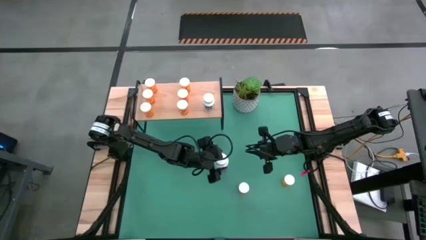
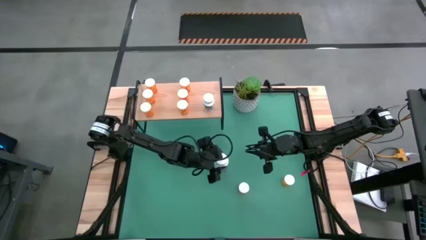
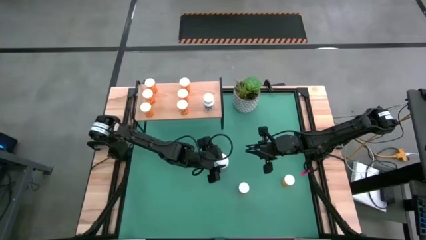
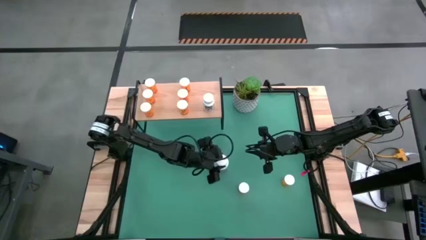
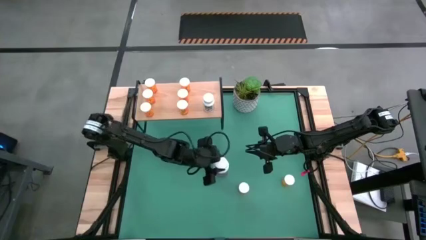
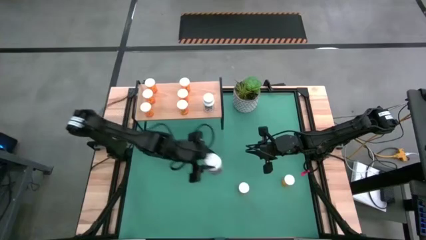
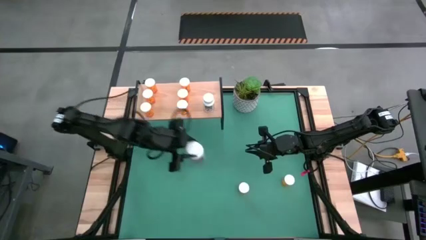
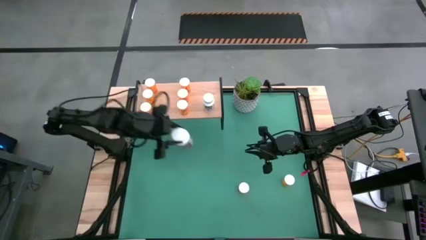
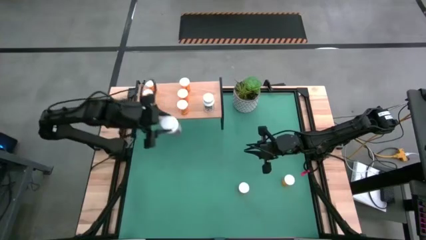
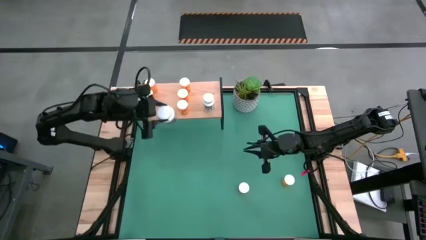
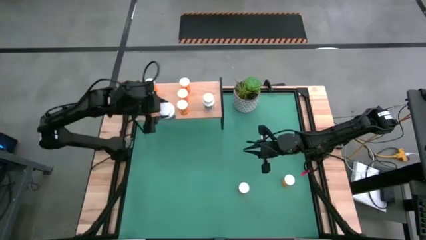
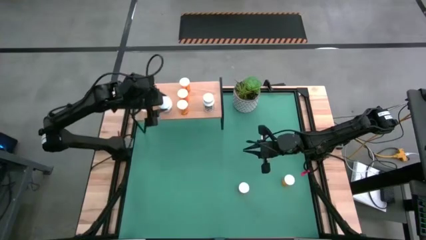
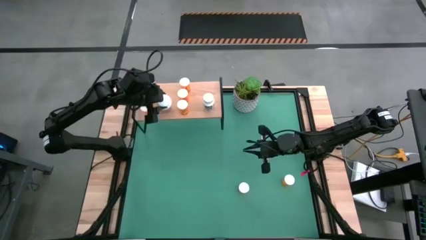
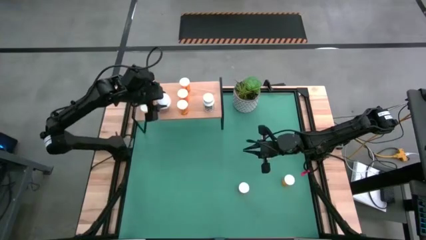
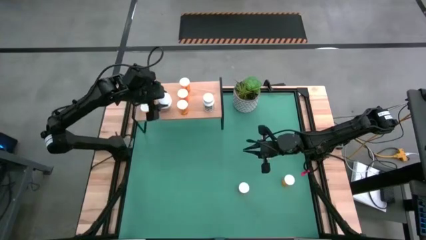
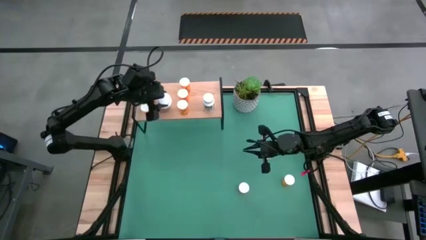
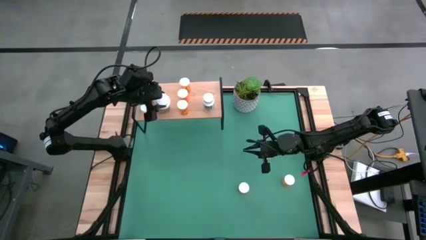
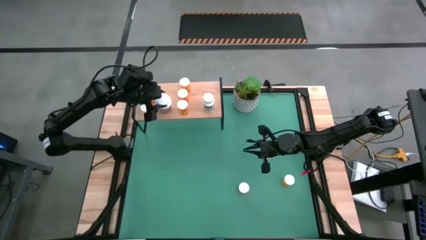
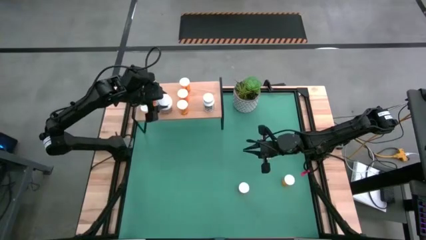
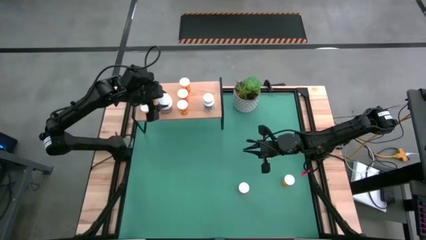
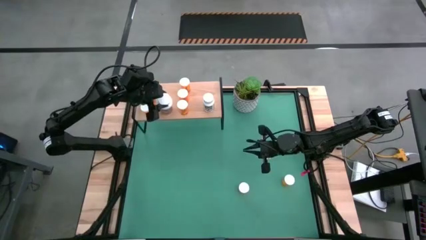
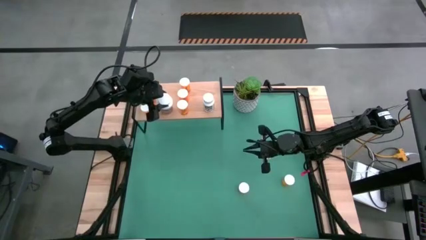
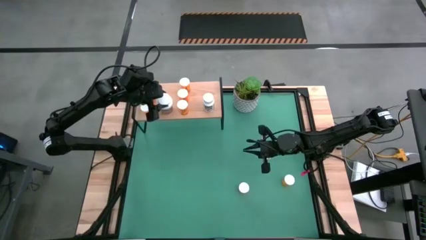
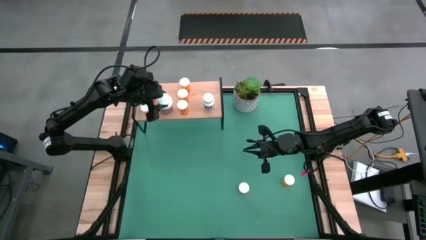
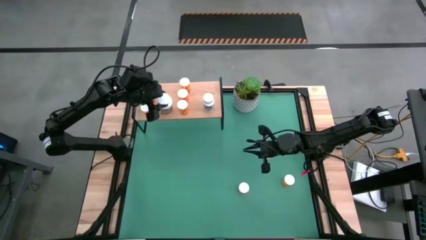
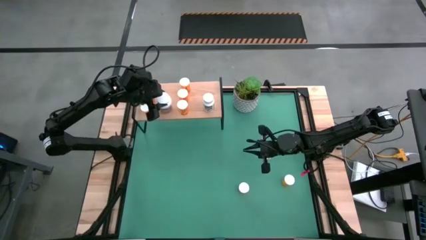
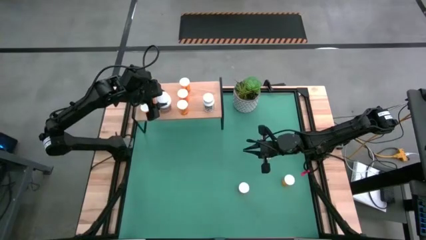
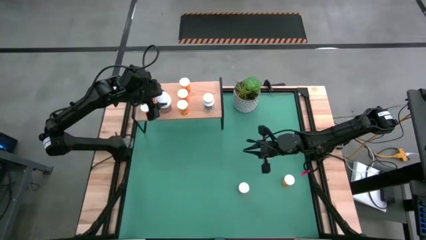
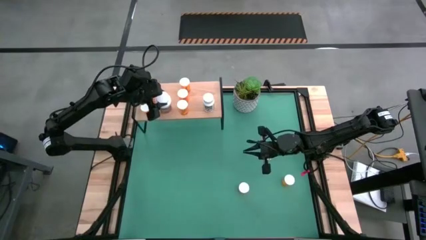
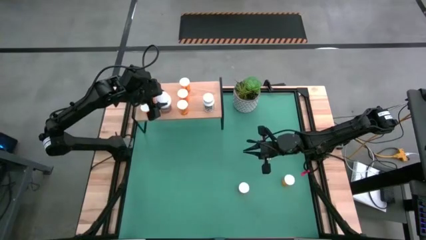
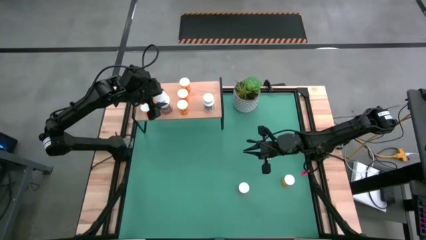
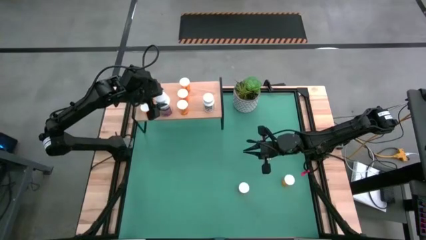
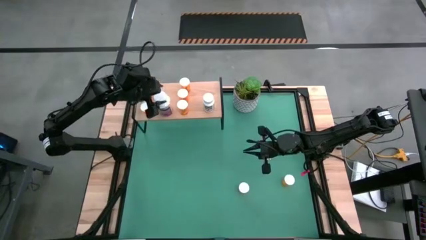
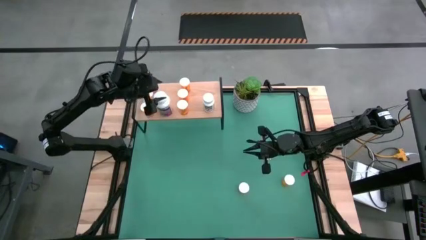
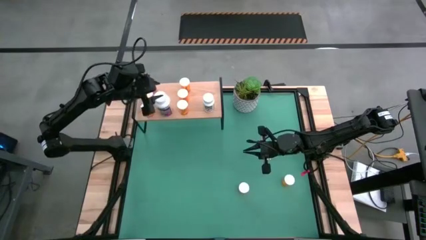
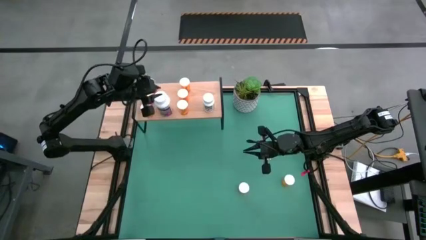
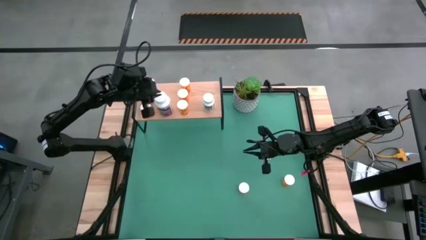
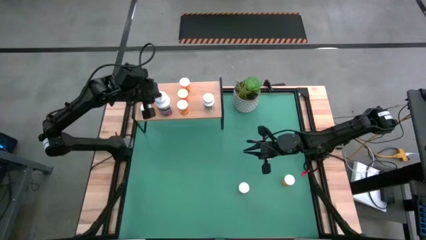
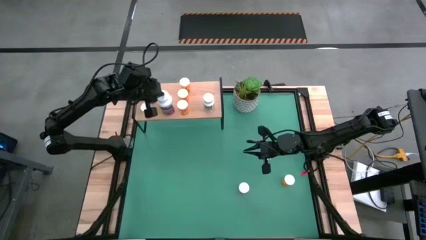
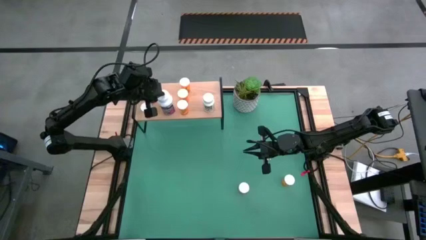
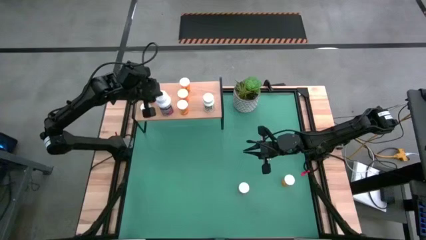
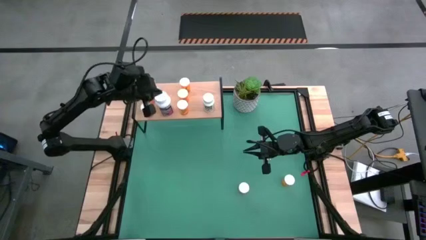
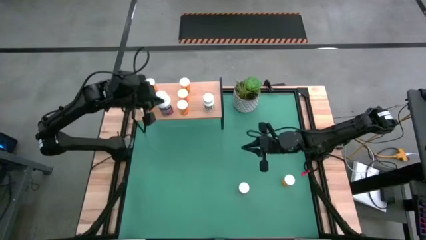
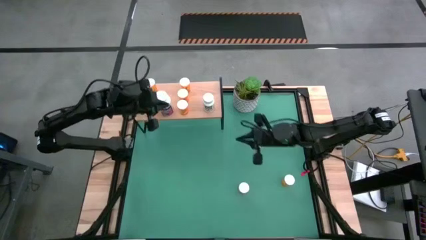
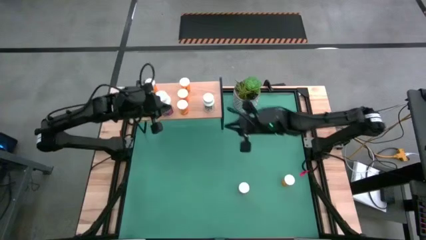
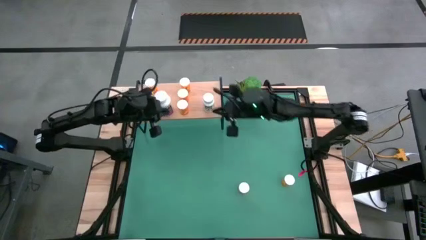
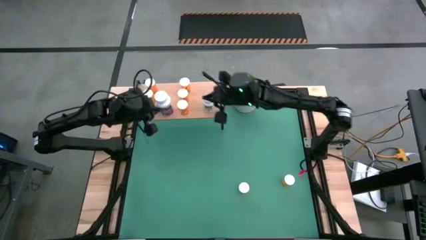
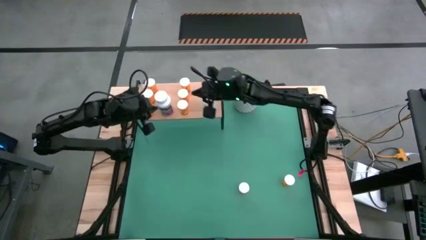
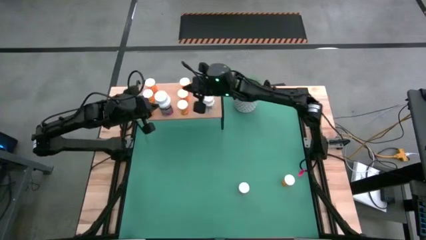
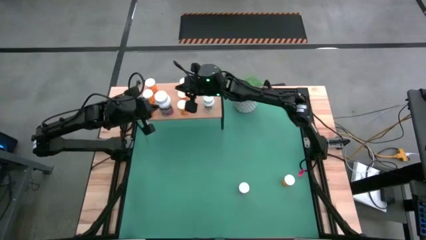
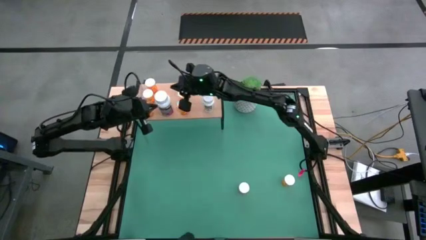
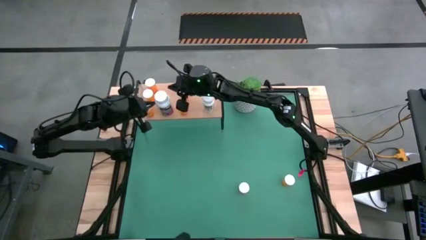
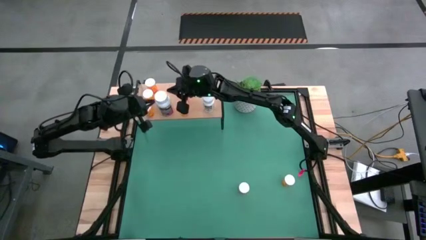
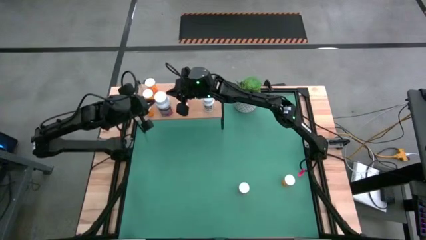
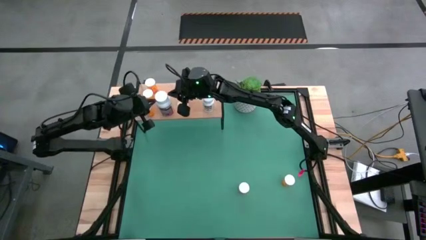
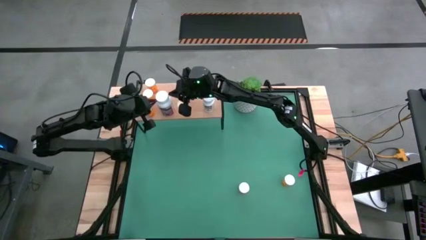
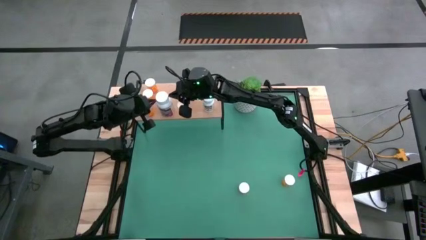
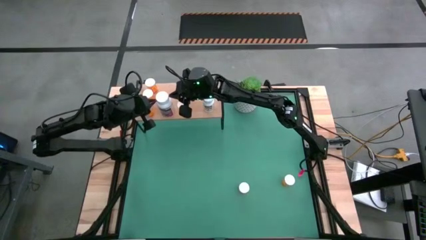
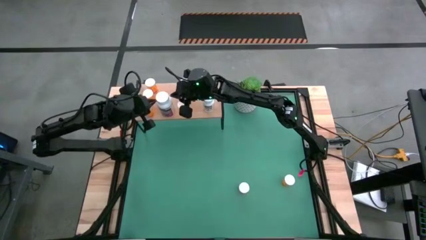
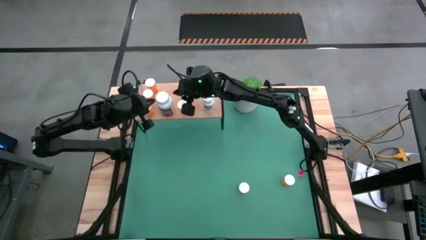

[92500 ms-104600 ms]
Task: Pick and place medicine bottles onto shelf by color
Put the large white pill bottle on the shelf

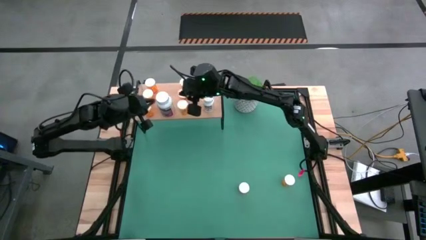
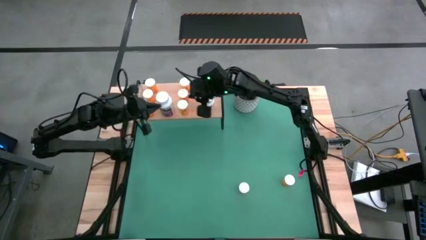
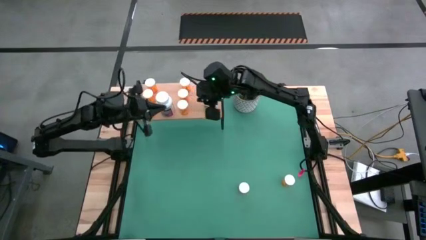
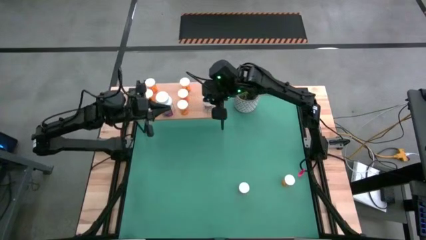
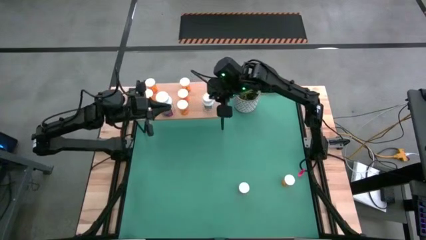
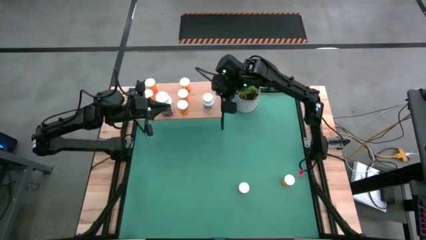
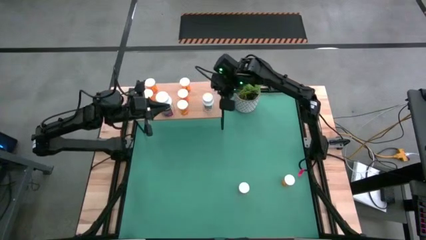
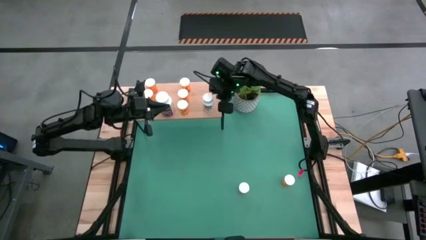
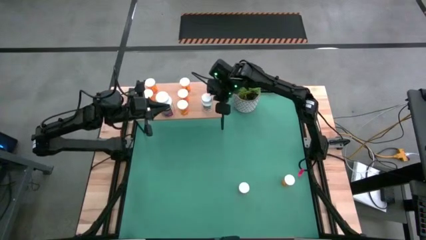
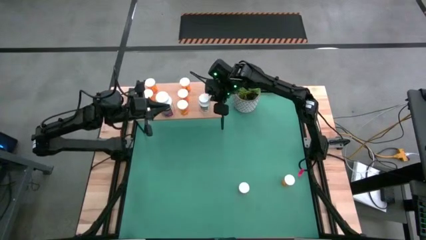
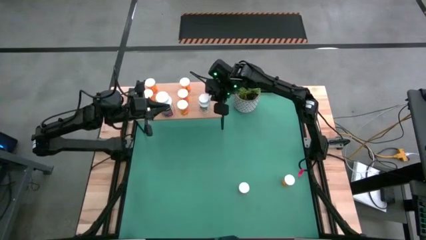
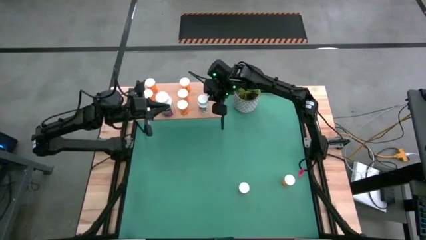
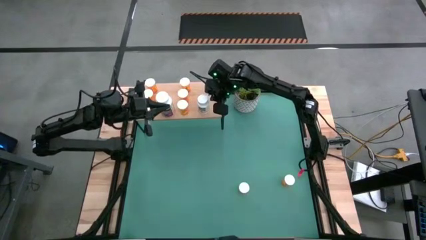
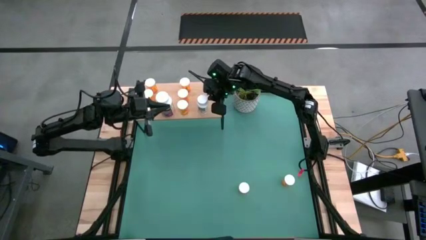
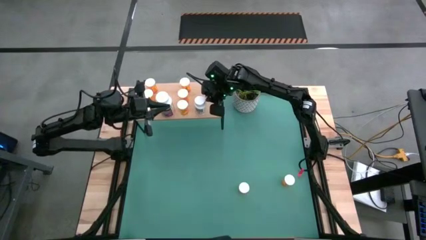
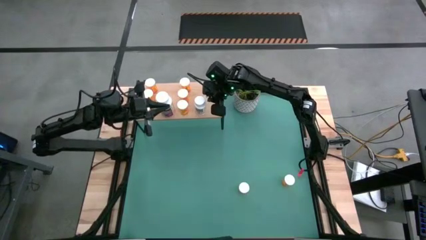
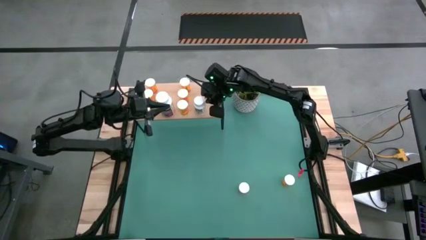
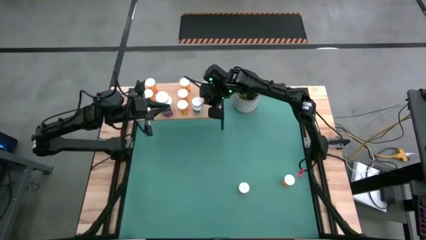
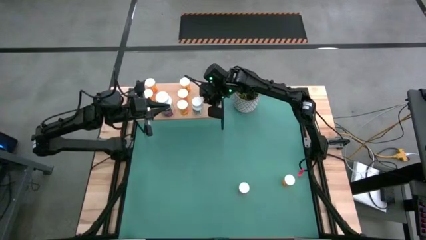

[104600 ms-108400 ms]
Adjust the small white pill bottle on the shelf
